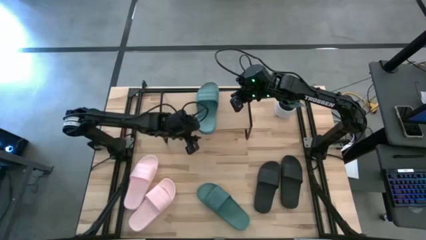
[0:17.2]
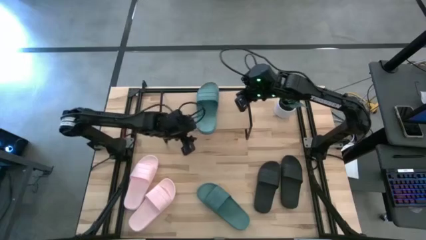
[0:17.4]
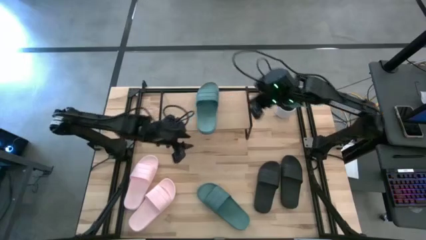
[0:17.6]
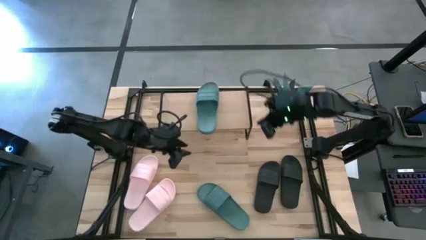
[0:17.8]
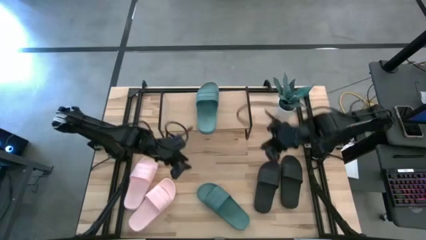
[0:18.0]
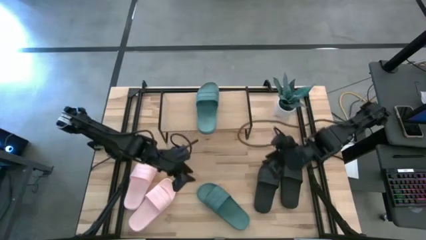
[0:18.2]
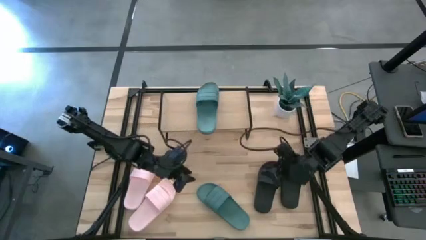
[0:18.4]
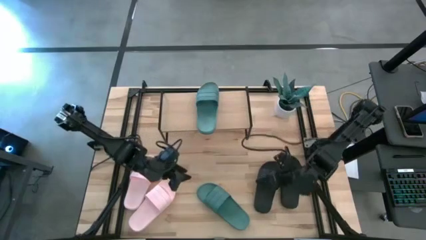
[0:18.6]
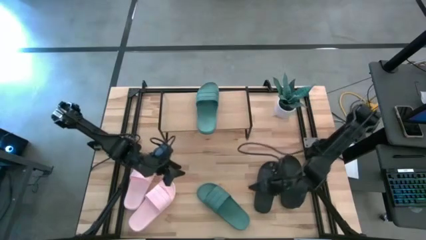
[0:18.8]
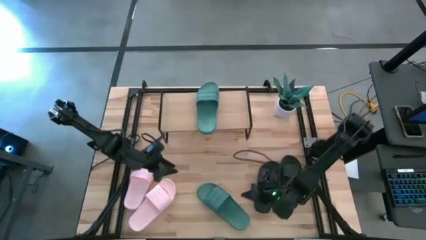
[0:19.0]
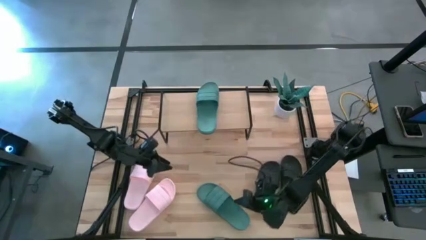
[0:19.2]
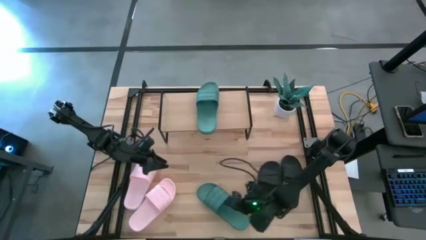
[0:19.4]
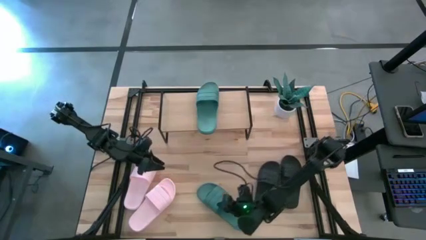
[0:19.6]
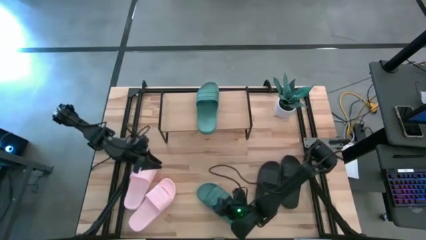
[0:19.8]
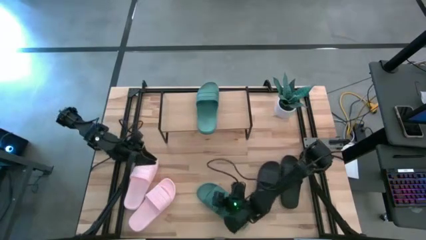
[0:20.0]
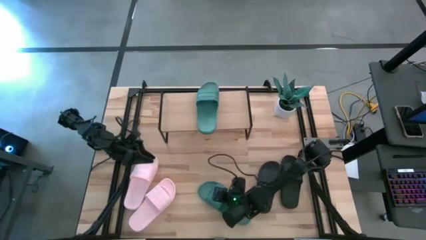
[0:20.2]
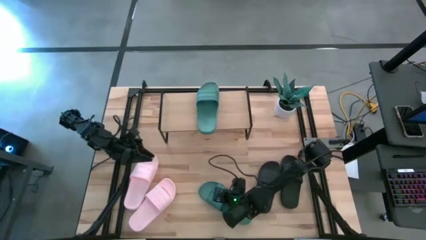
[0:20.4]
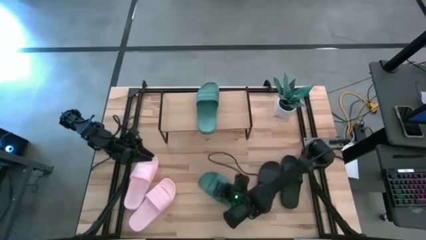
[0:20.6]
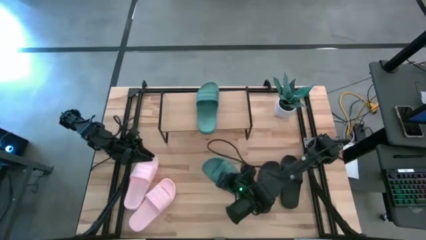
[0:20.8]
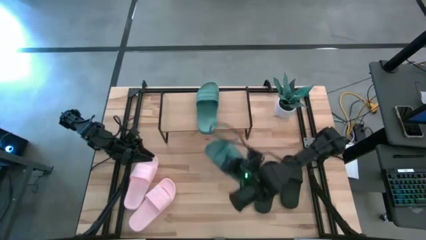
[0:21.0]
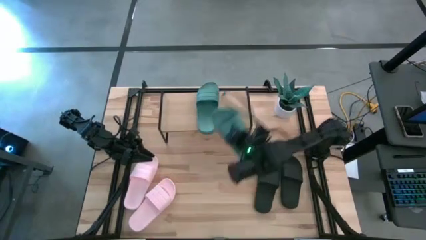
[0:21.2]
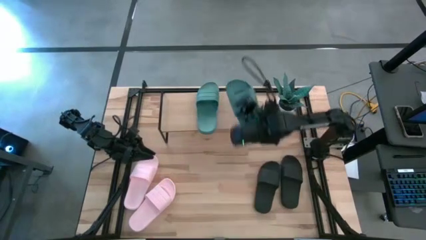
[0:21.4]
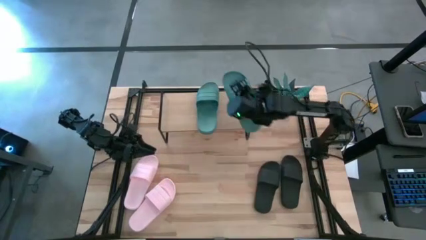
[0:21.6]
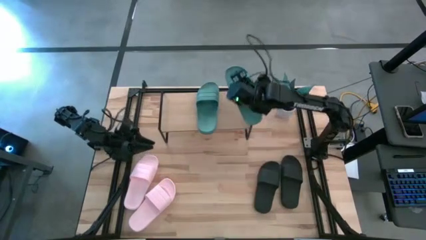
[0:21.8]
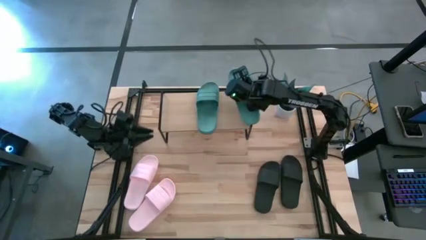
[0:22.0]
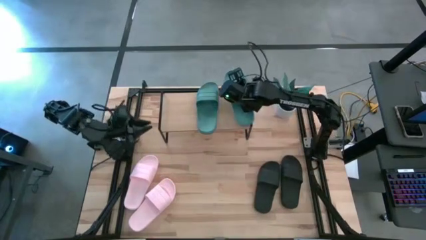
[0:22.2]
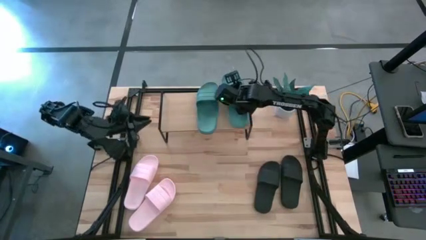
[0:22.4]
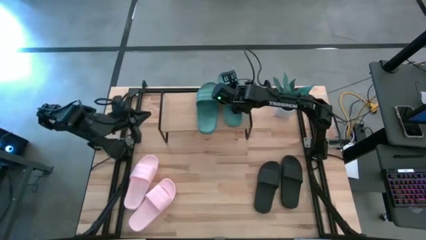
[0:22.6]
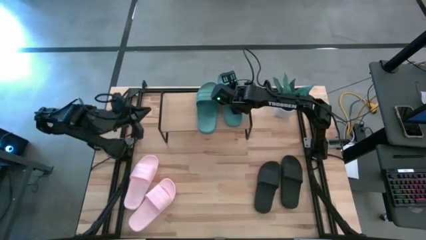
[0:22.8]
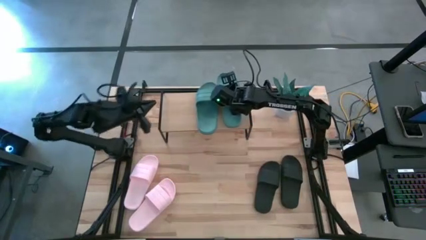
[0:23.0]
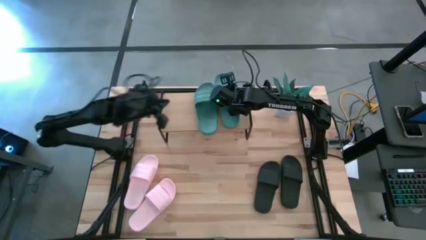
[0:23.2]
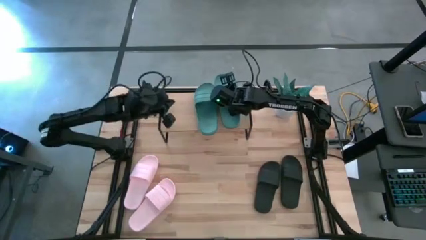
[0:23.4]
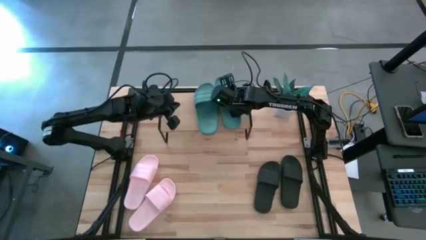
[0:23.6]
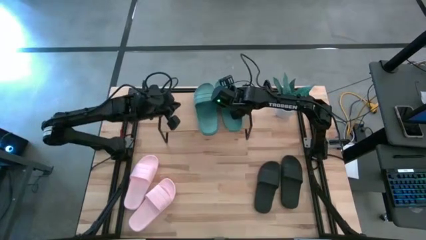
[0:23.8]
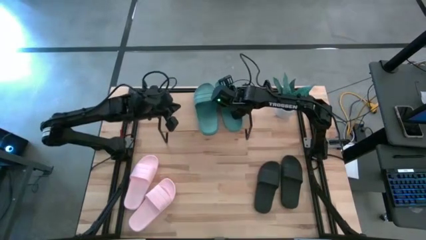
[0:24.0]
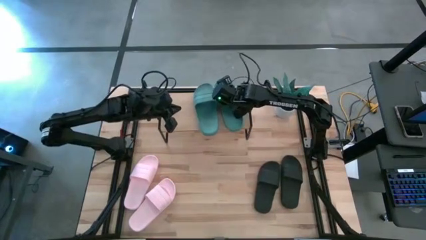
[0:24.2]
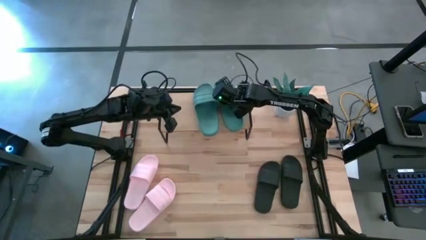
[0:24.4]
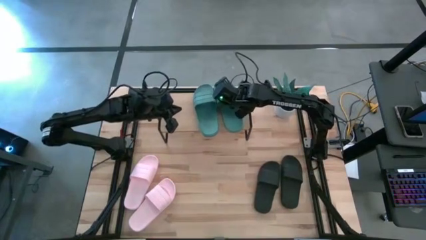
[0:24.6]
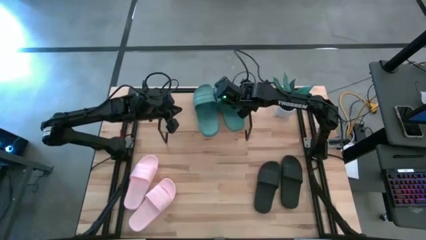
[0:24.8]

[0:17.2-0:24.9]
Task: Pick and place slides into the shelf
Put the green slide on the shelf

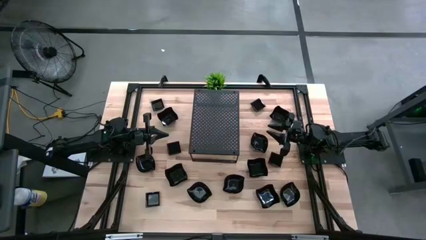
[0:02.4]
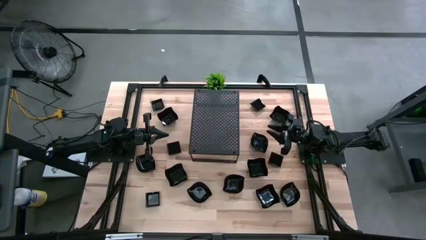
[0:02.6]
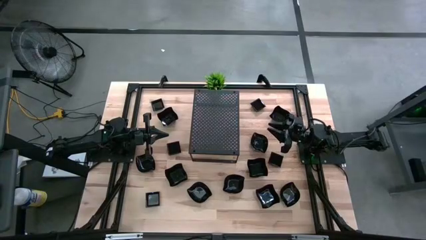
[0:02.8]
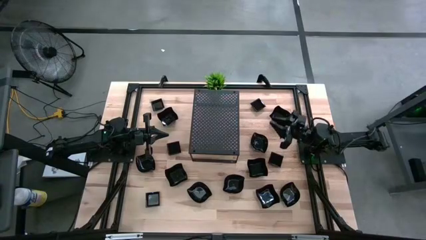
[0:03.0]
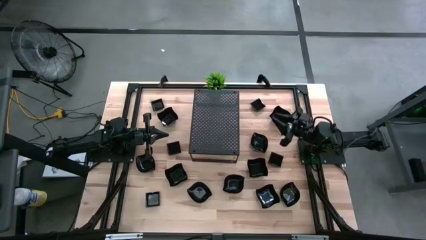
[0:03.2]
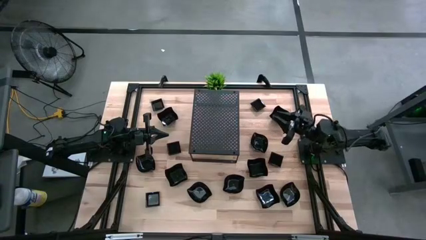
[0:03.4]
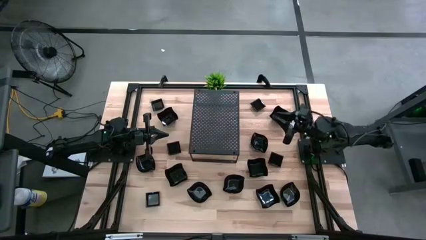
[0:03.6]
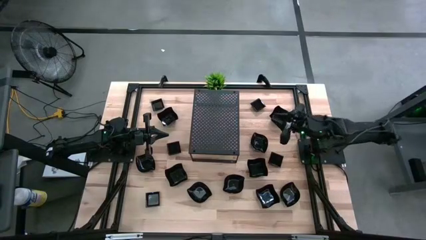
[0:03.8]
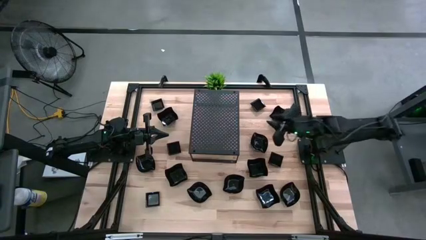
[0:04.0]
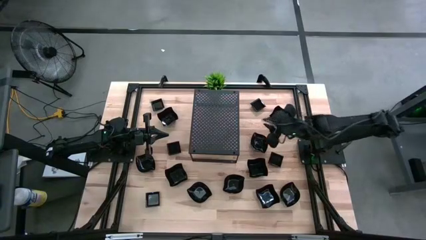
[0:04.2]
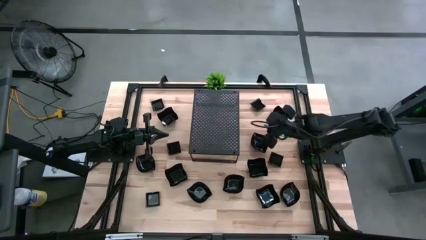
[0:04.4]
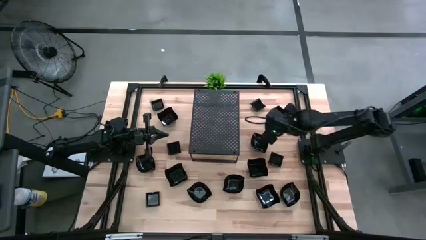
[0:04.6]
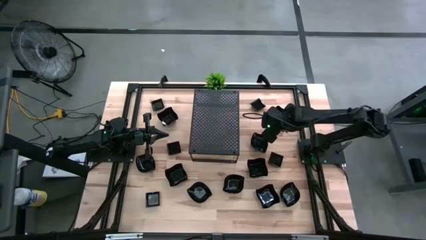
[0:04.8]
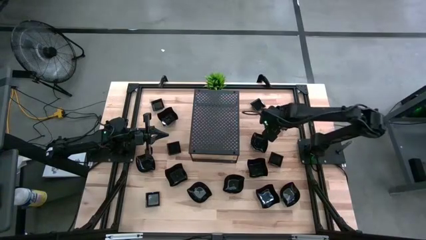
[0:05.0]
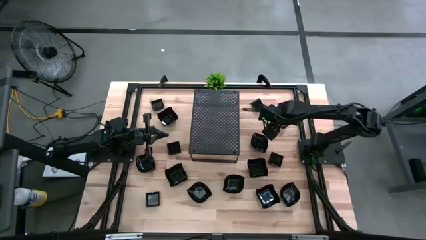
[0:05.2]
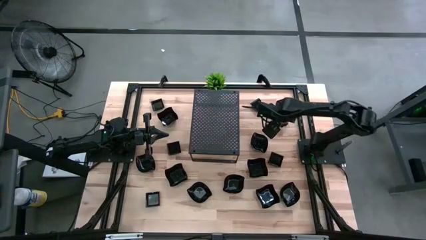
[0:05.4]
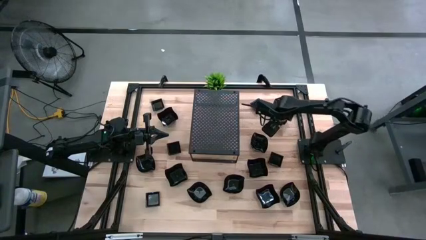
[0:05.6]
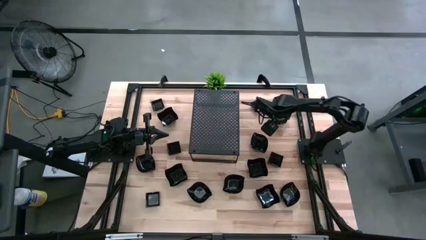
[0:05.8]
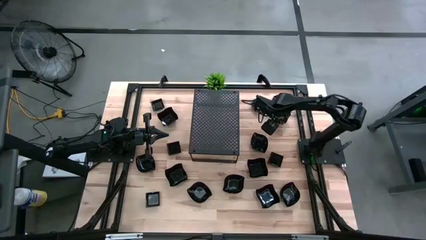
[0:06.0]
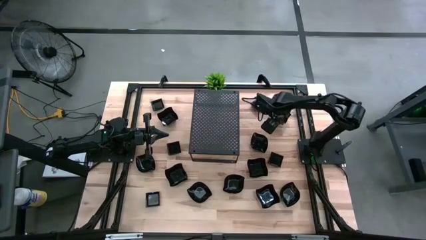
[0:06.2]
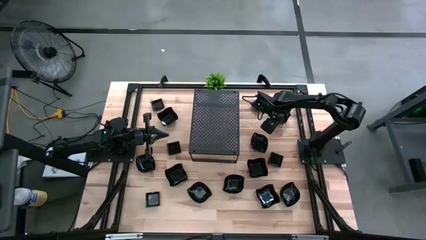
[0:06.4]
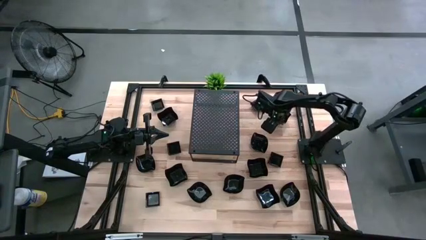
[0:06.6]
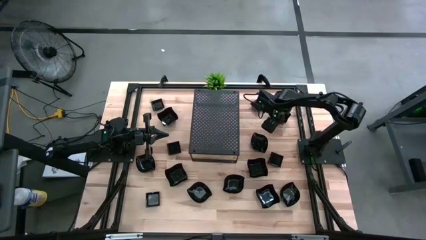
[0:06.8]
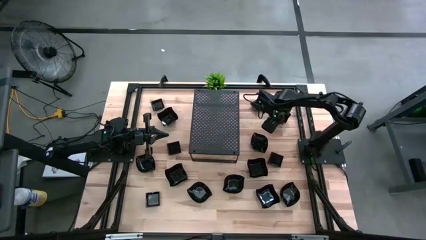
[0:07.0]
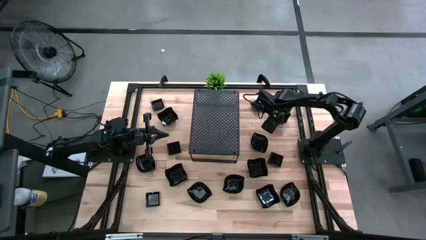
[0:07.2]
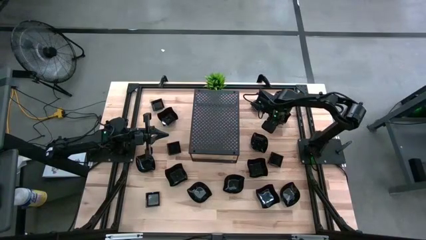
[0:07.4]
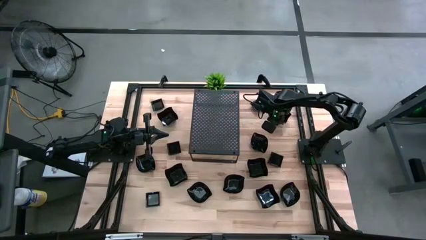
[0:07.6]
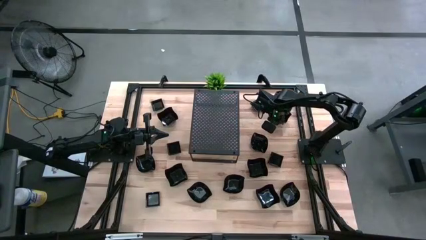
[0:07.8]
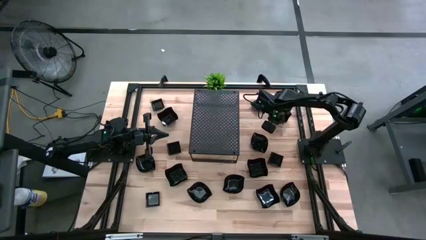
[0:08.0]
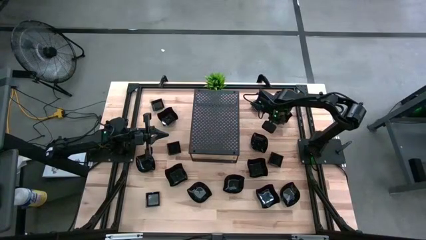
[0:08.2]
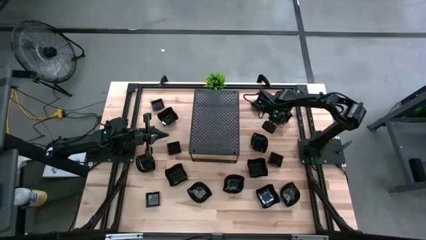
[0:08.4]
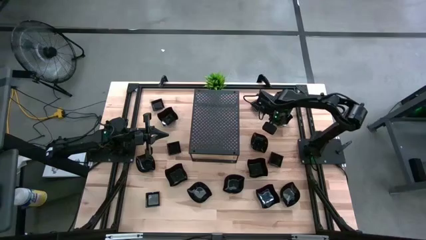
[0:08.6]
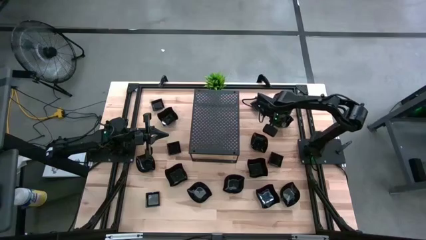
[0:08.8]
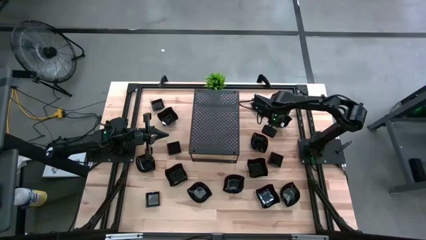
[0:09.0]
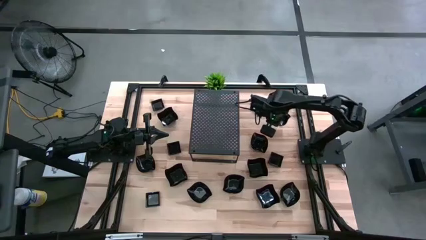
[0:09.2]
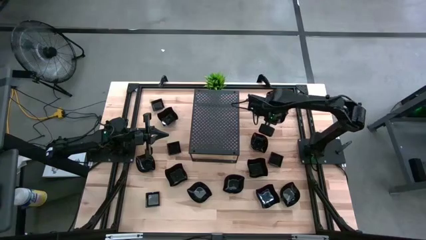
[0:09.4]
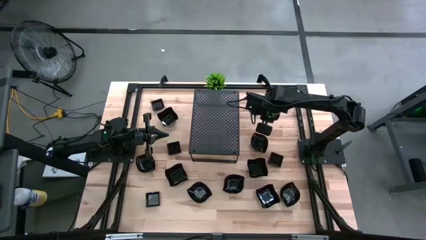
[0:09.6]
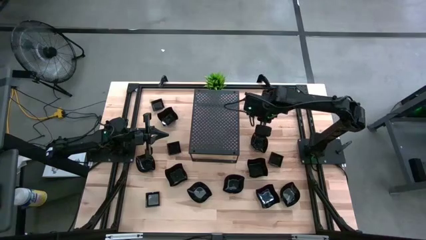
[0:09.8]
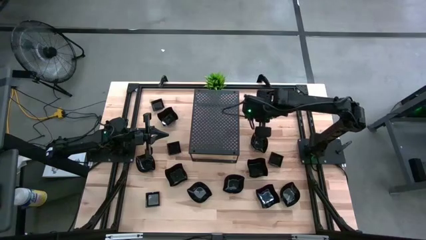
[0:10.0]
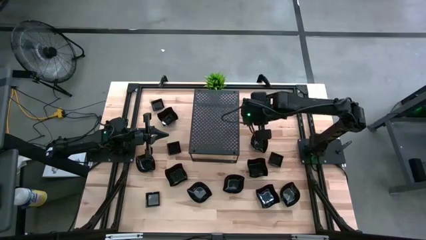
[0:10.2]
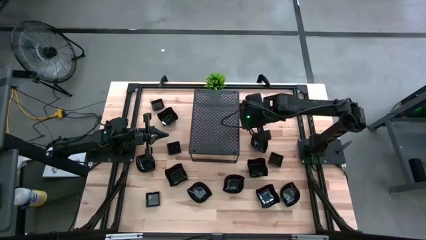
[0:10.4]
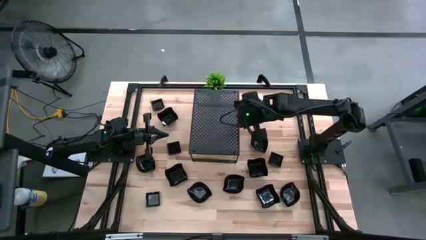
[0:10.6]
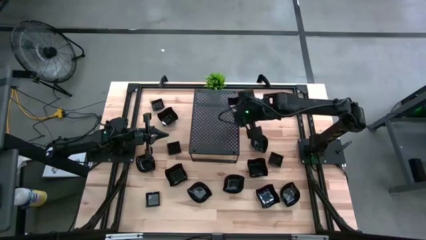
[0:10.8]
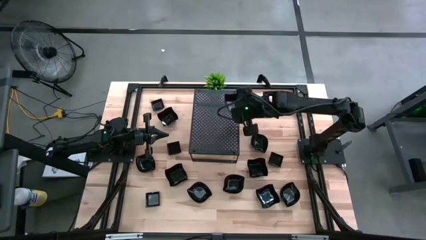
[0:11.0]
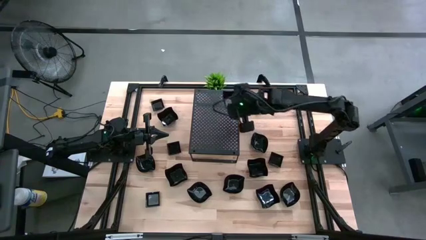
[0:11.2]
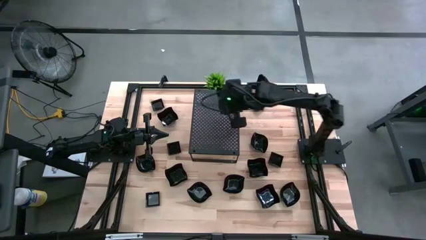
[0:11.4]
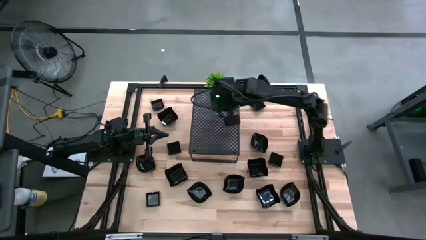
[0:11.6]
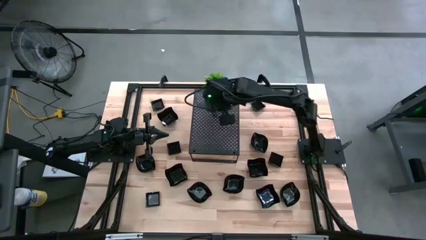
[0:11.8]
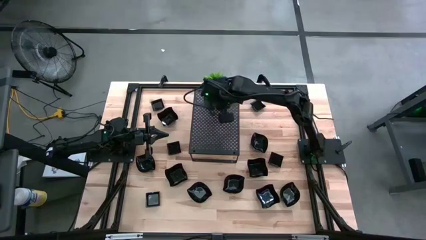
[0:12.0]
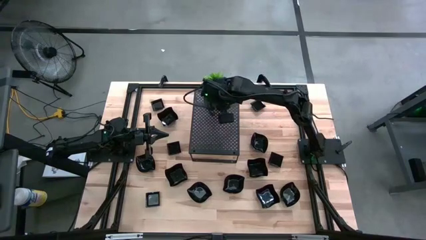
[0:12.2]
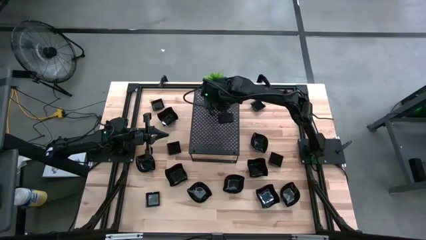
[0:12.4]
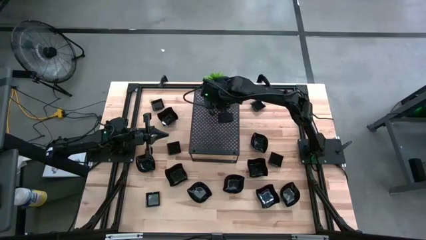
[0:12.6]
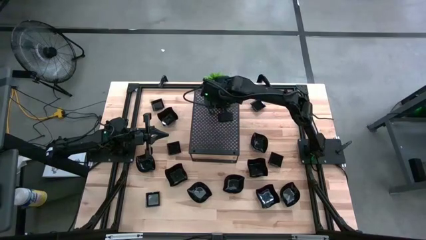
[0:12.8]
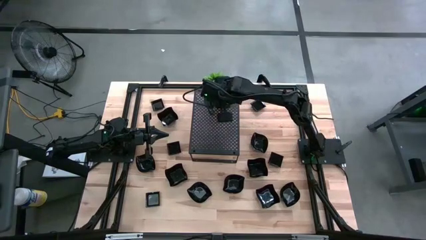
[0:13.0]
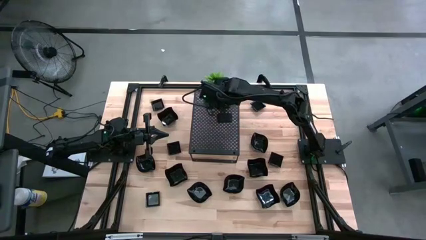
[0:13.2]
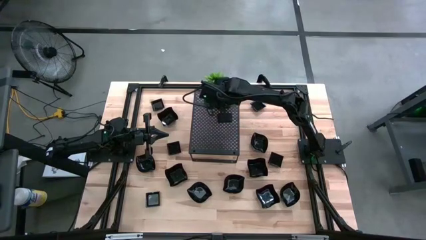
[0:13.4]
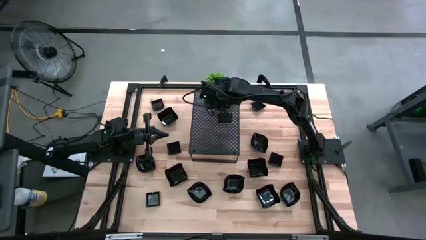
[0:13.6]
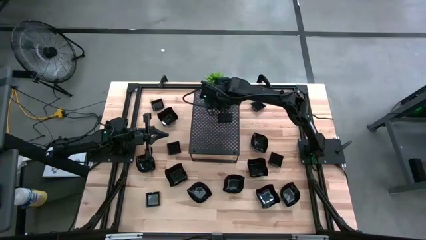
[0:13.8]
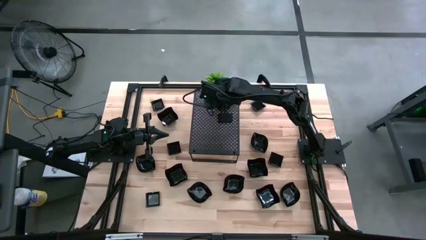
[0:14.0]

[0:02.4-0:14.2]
Task: Pick & Place Mini shaped plates
Put the distorted square plate on the shelf
